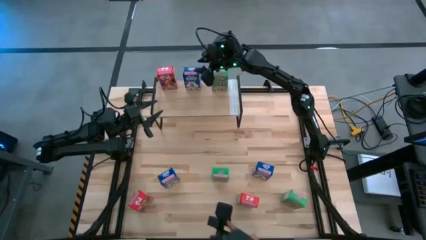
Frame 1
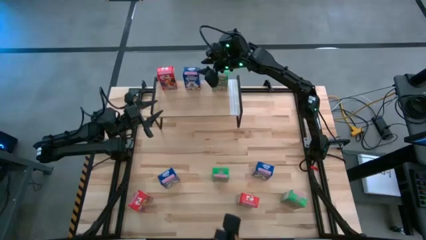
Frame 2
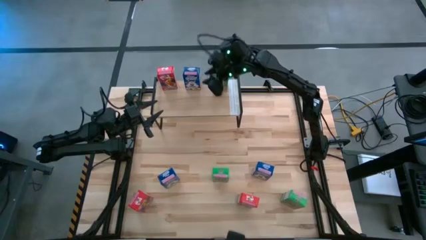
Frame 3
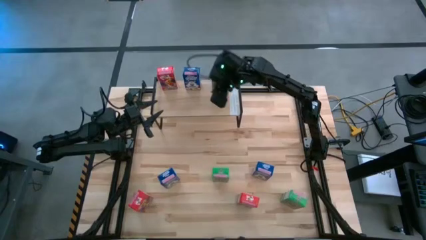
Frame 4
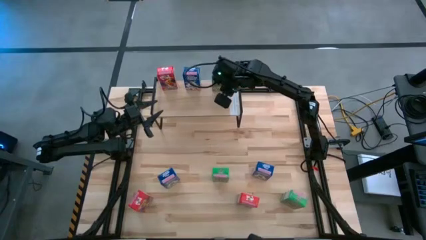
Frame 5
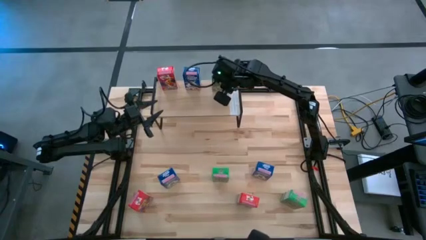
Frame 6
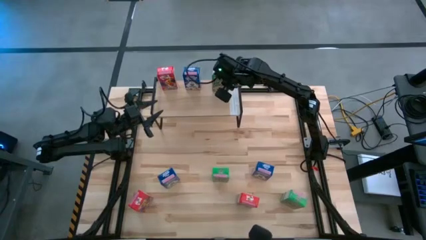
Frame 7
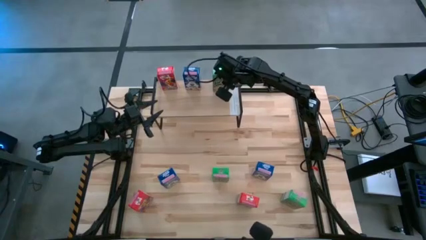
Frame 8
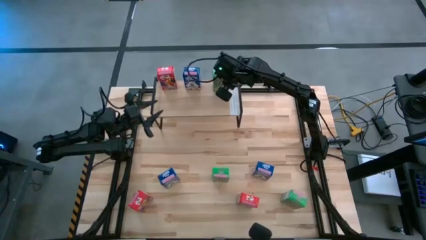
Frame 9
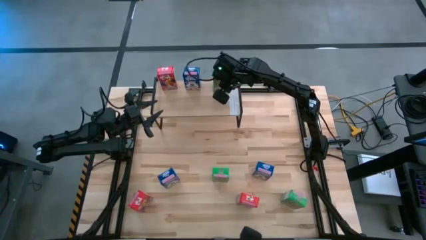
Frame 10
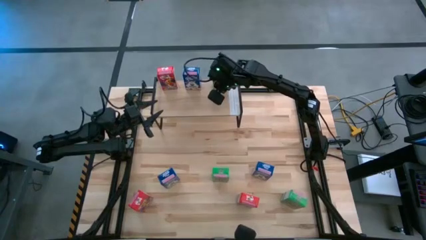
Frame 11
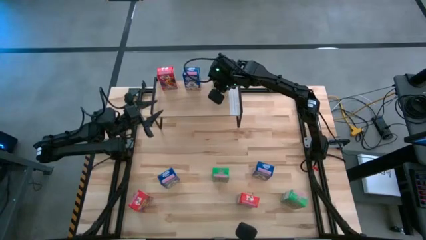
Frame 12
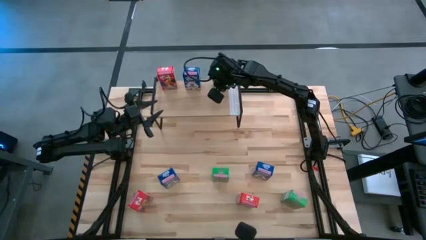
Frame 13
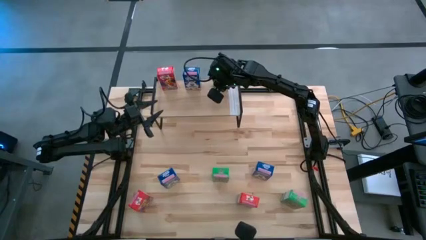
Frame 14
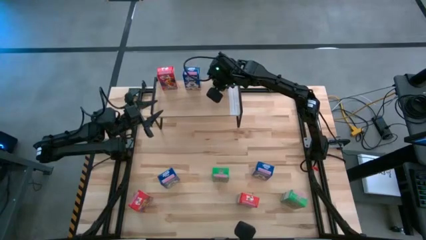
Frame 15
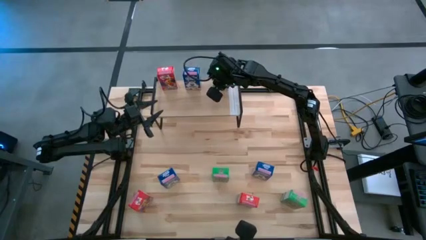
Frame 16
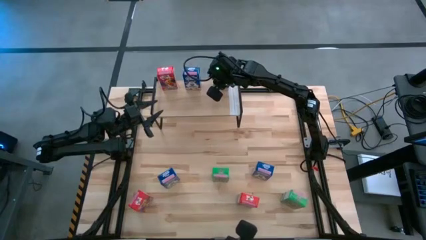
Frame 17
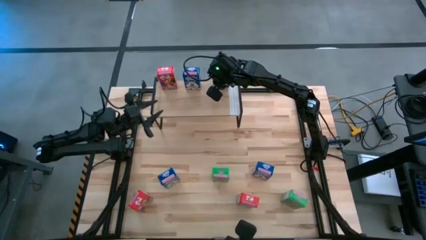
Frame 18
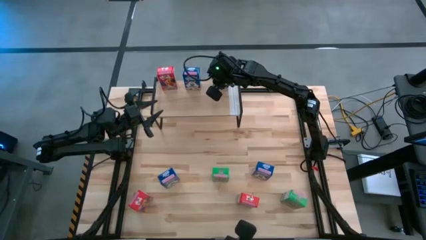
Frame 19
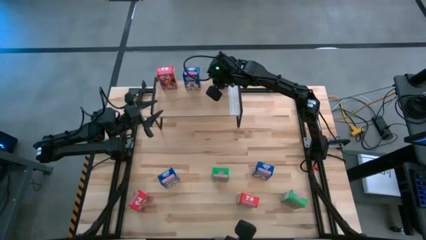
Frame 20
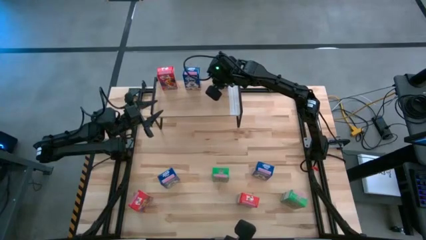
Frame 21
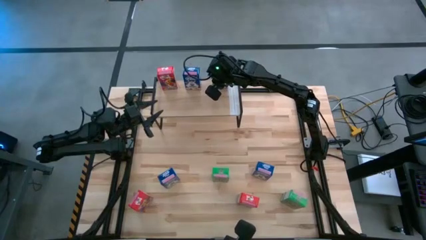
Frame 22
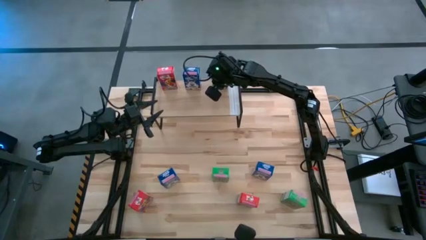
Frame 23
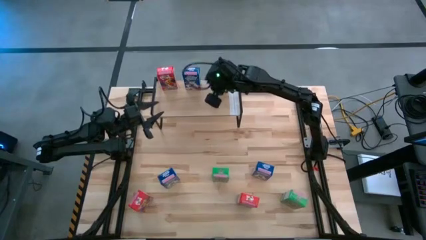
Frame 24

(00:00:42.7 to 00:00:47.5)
Task: Stack cereal on shelf
Adjust the green cereal box

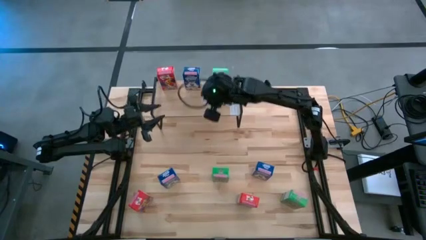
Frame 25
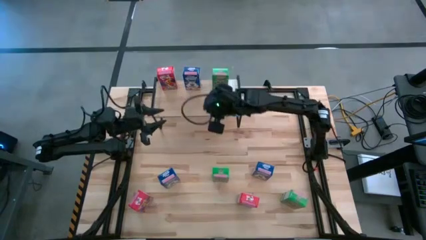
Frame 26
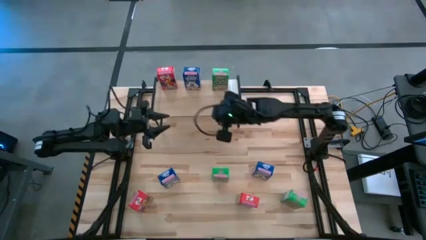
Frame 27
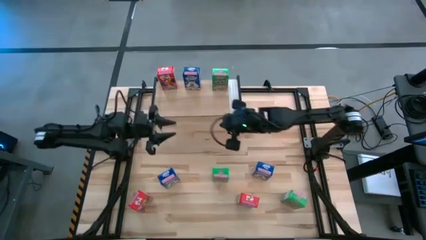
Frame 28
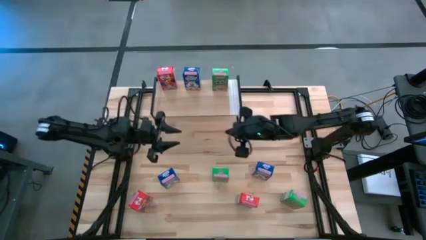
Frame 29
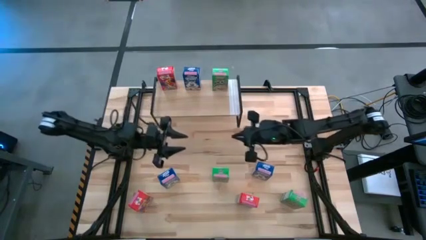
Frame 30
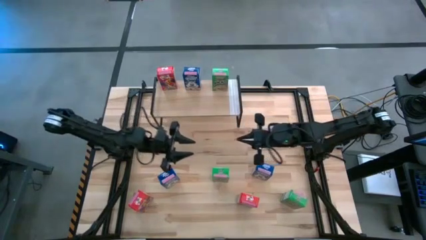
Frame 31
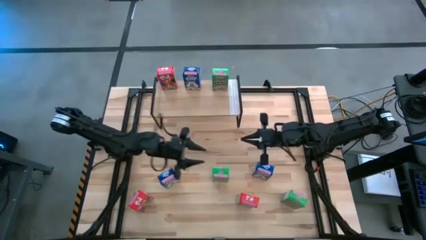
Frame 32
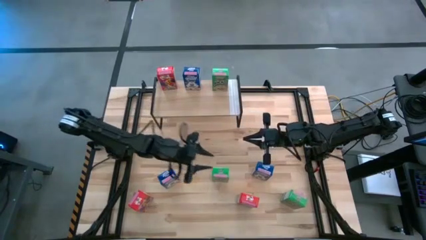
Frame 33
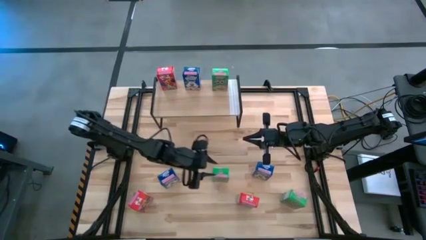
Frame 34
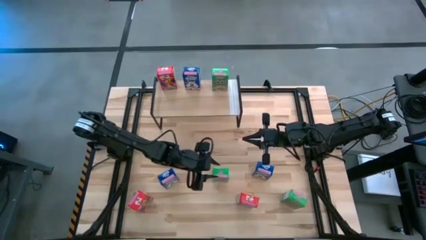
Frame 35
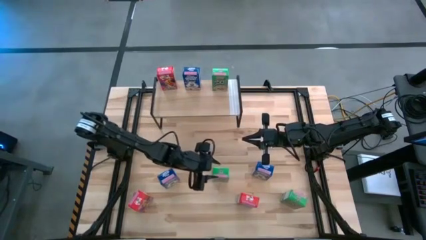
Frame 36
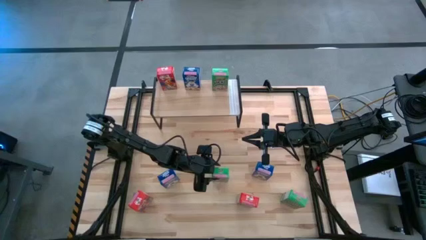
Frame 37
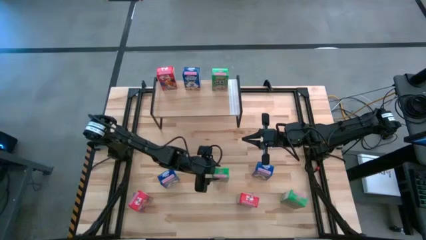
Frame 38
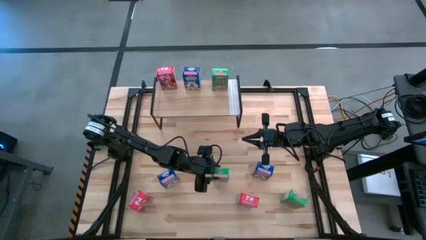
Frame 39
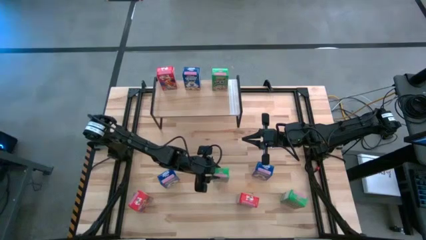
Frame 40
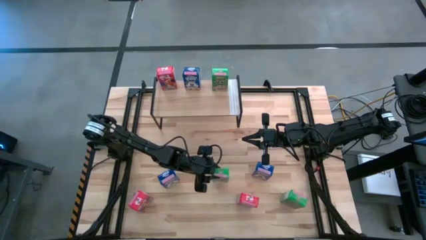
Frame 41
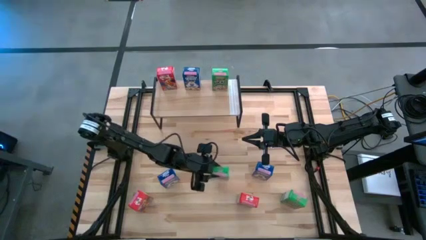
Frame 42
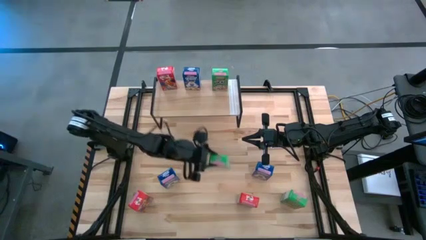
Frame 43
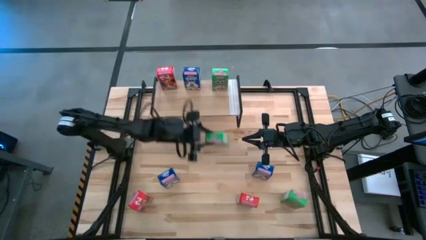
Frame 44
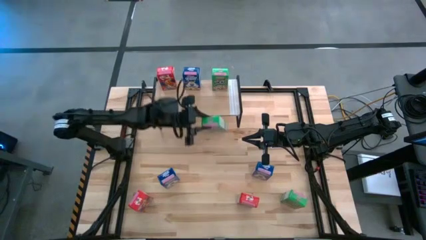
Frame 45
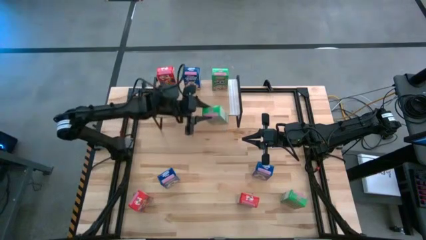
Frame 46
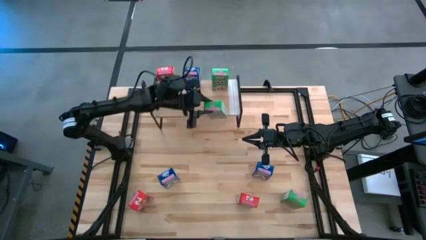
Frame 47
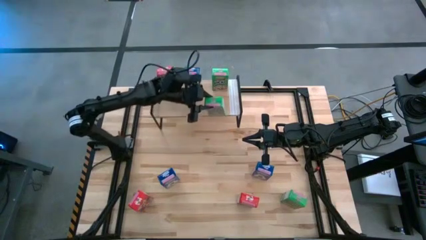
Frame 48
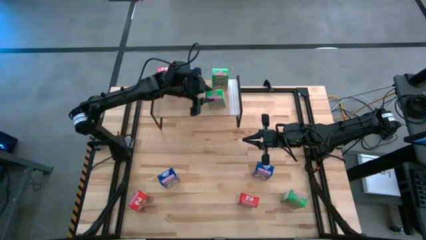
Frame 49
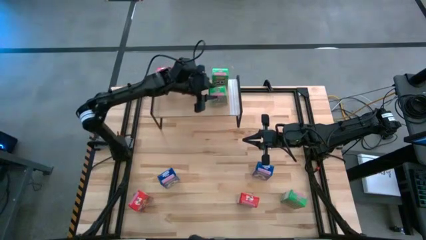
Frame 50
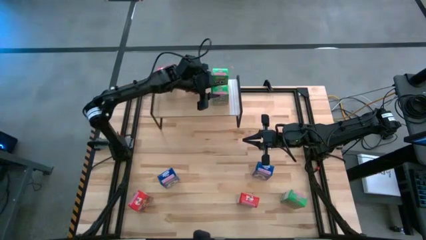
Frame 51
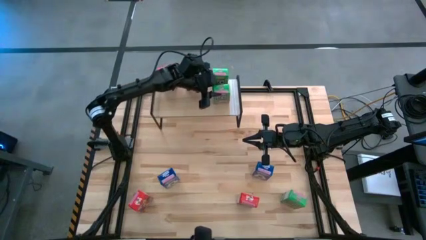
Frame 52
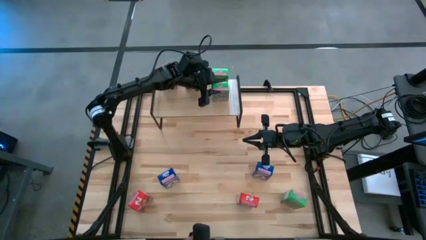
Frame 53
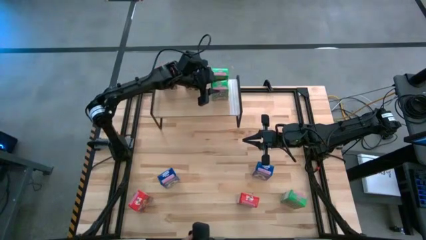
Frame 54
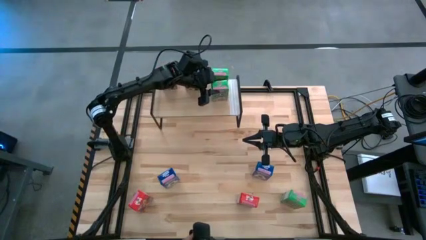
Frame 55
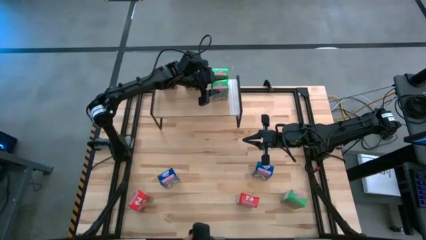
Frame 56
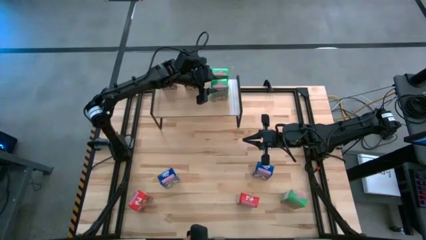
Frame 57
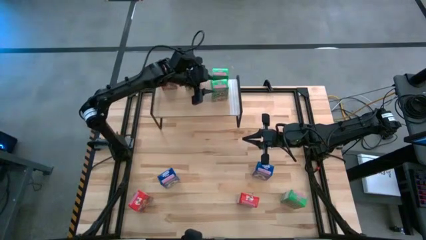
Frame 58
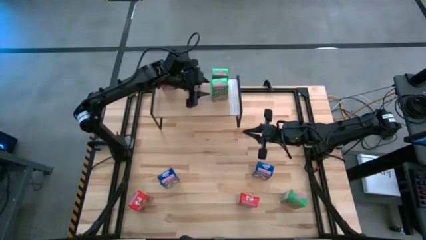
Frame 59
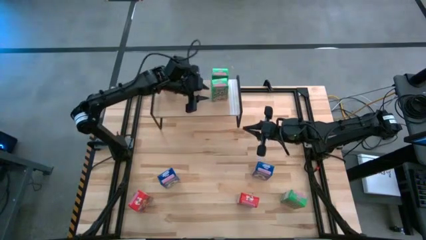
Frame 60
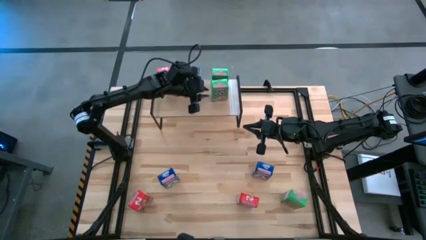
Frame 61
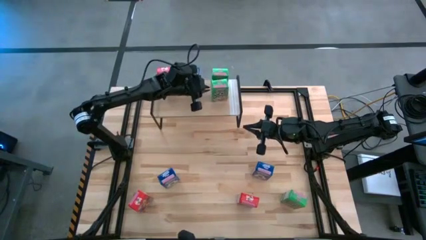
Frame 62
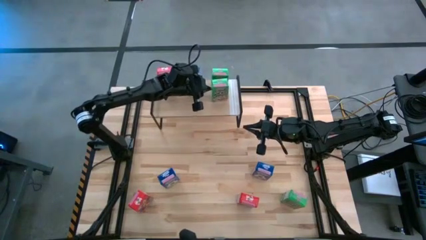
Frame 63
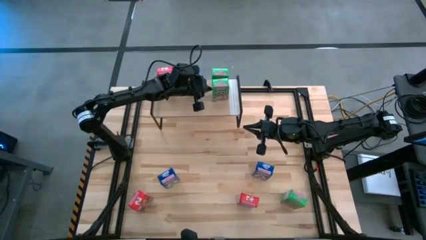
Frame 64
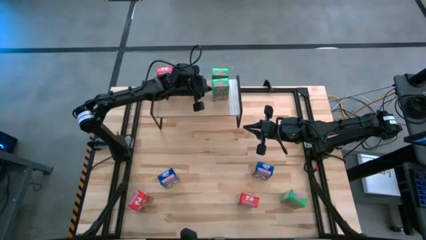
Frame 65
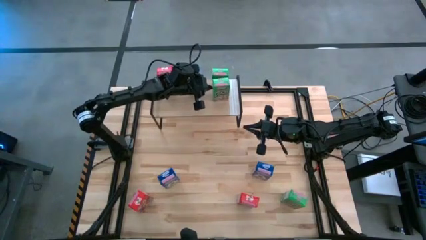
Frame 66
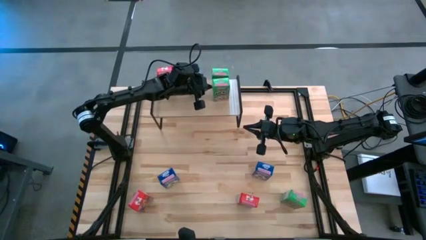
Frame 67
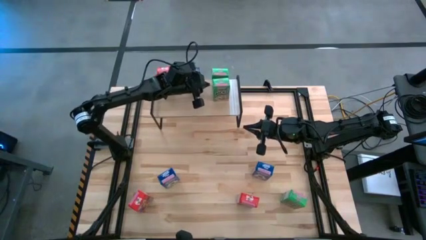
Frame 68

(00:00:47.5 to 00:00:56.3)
Put the left green cereal box on the shelf aligned with the green cereal box

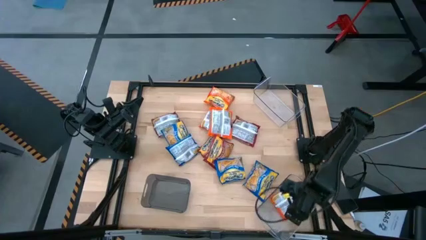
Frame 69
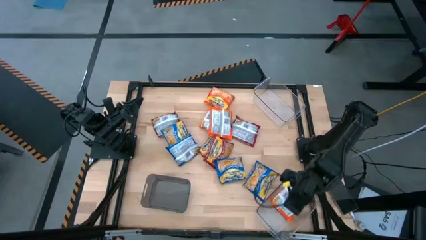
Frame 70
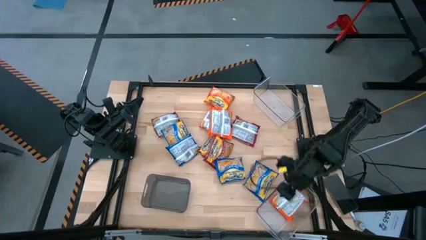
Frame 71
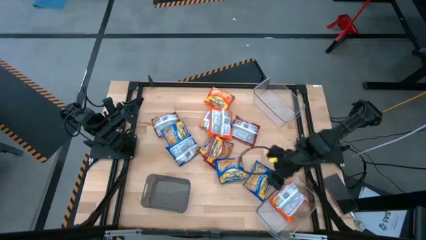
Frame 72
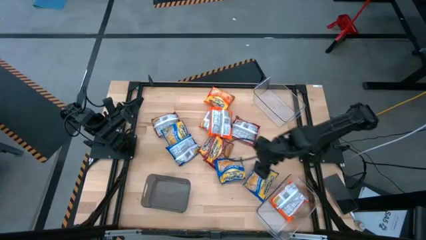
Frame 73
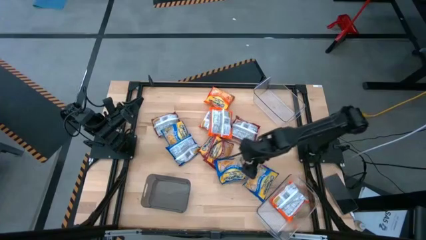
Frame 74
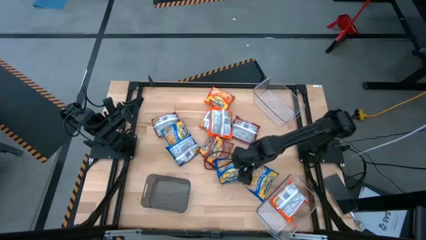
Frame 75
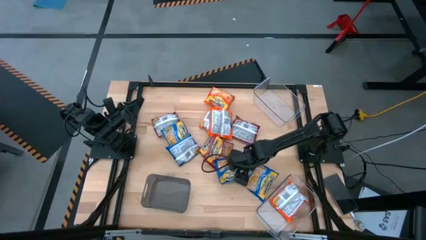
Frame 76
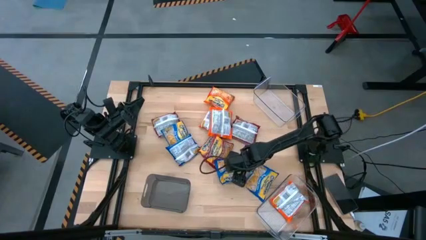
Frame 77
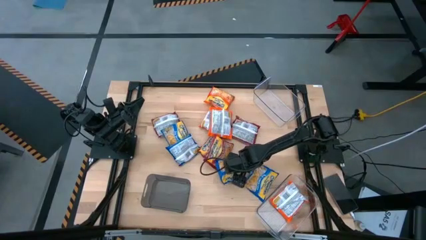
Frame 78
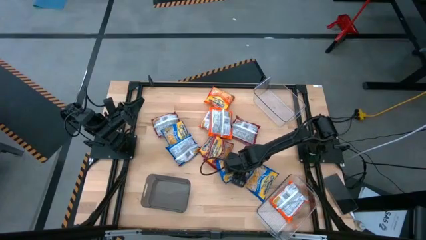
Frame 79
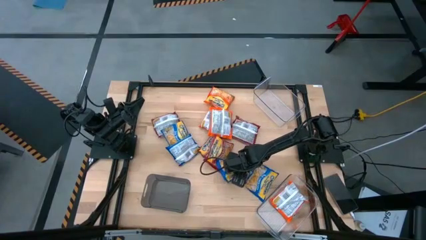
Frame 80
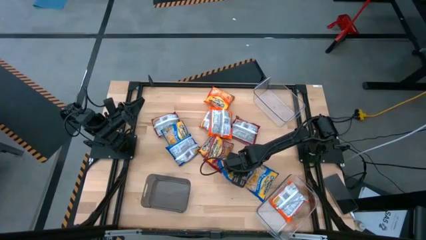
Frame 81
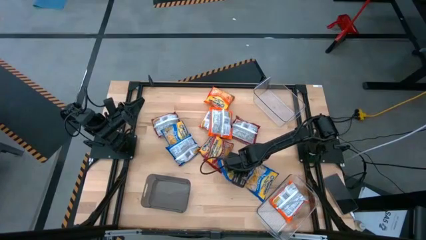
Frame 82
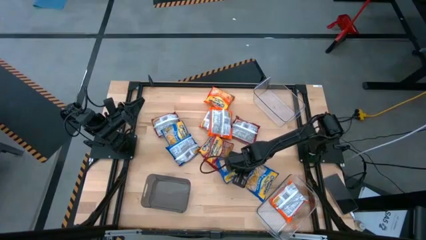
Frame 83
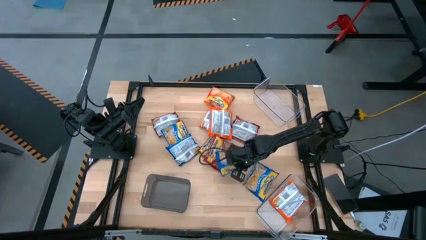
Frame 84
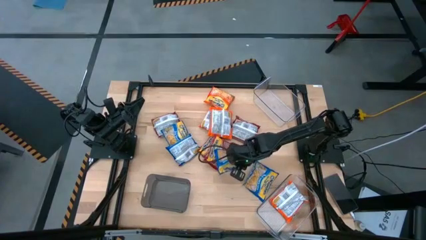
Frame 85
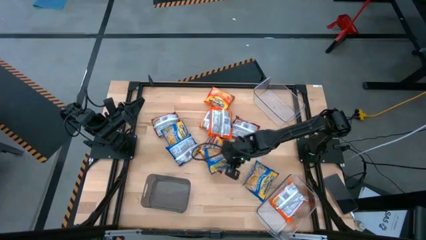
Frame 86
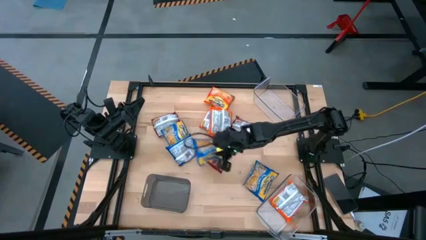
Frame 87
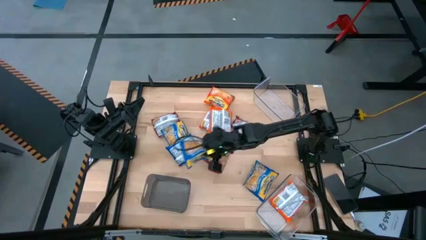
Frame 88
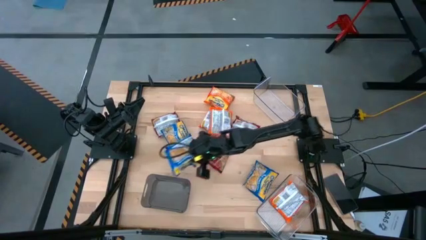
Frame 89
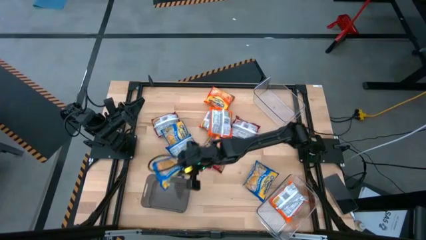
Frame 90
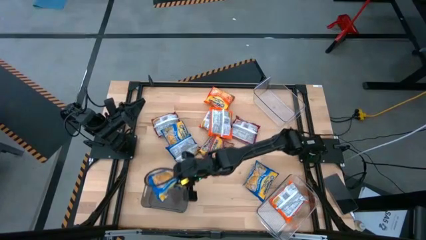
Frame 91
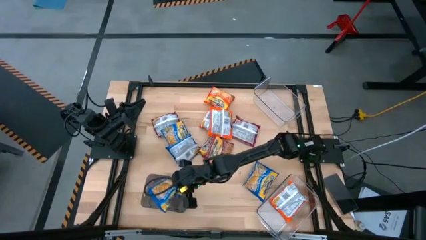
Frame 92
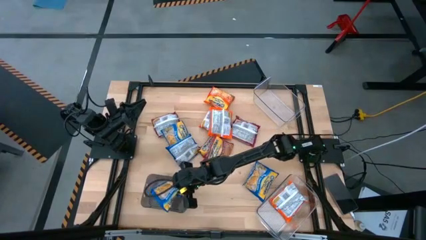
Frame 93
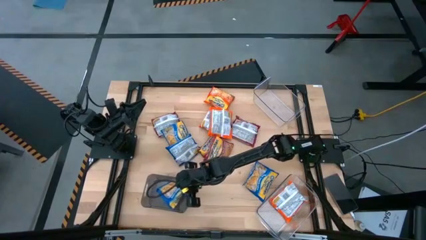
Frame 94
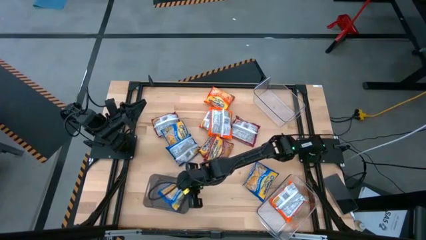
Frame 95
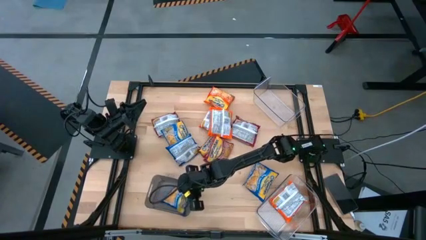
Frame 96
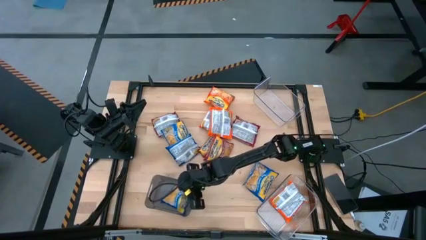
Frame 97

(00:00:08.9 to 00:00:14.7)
Task: Sort Maruchan noodles
Put the blue noodle pack into the black bin
